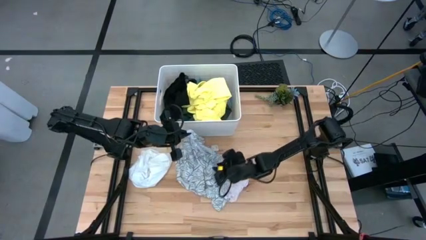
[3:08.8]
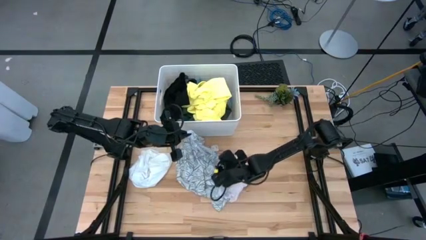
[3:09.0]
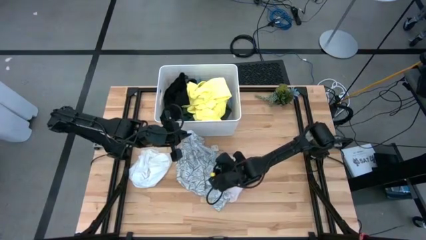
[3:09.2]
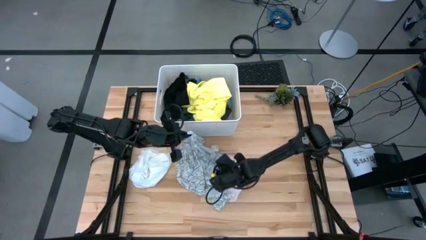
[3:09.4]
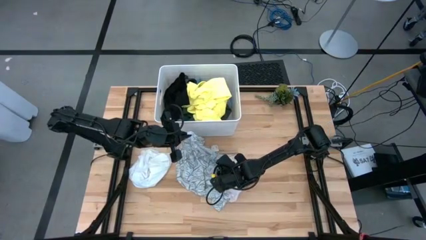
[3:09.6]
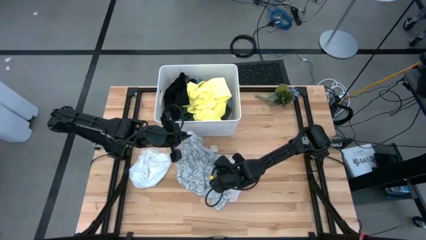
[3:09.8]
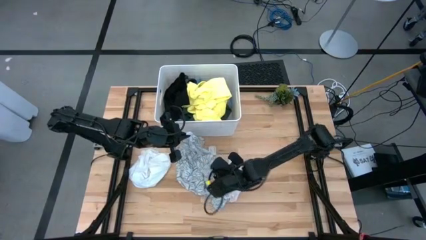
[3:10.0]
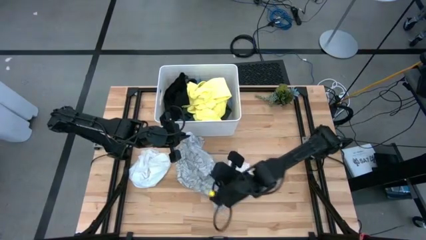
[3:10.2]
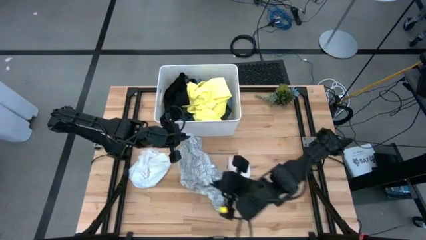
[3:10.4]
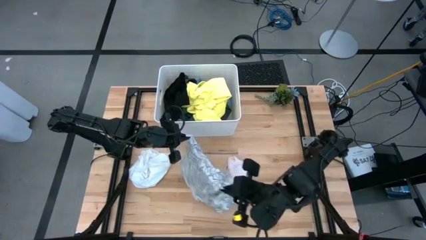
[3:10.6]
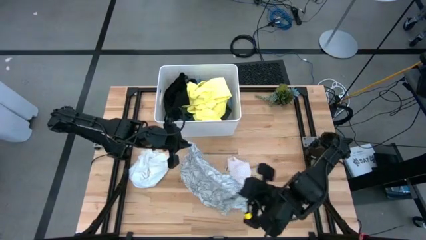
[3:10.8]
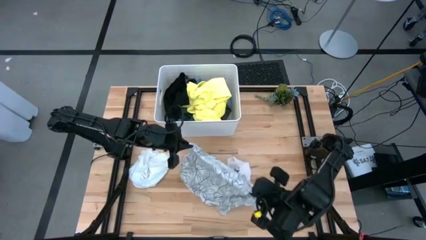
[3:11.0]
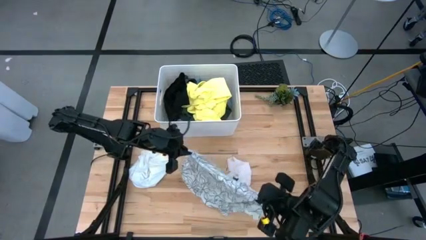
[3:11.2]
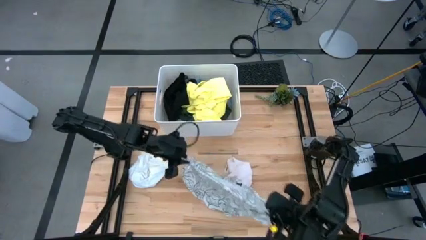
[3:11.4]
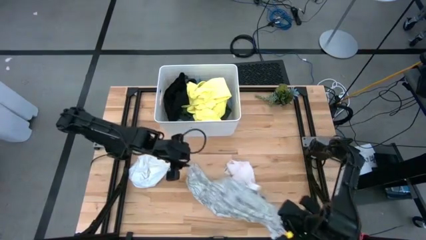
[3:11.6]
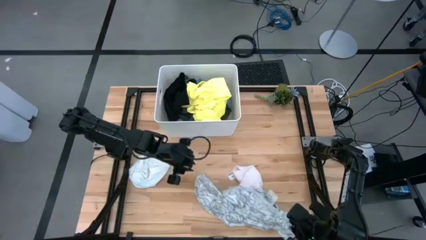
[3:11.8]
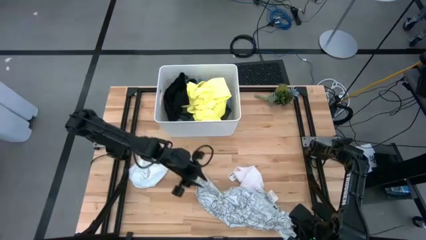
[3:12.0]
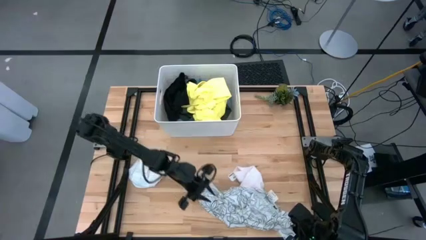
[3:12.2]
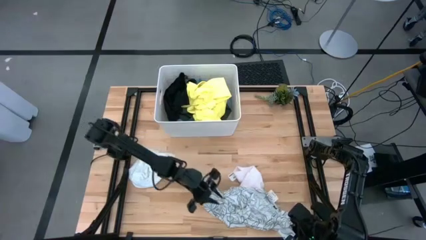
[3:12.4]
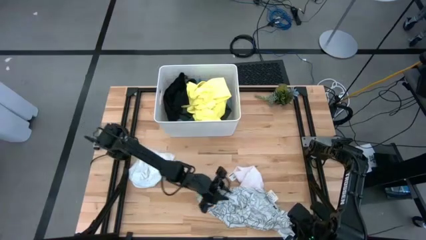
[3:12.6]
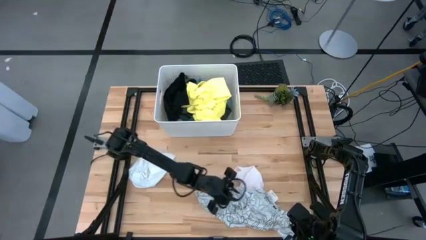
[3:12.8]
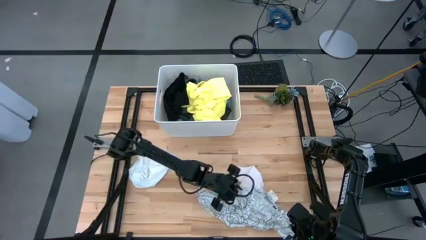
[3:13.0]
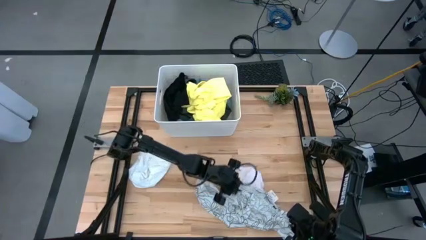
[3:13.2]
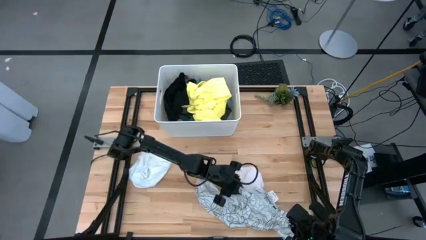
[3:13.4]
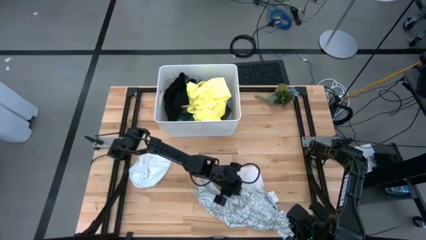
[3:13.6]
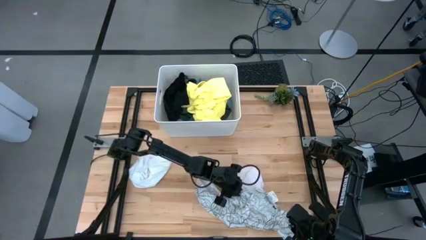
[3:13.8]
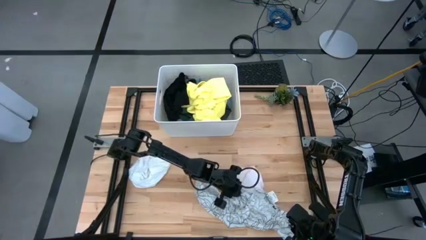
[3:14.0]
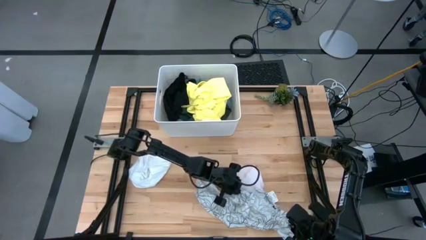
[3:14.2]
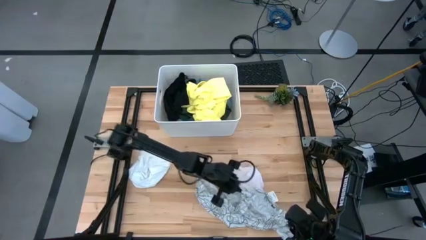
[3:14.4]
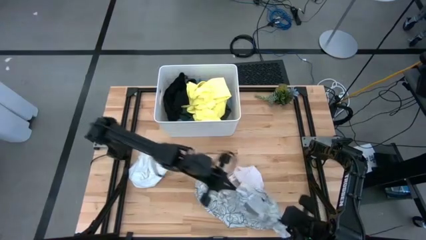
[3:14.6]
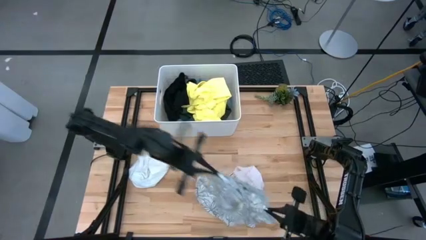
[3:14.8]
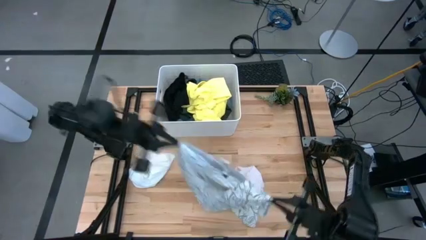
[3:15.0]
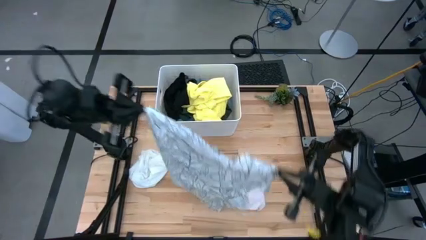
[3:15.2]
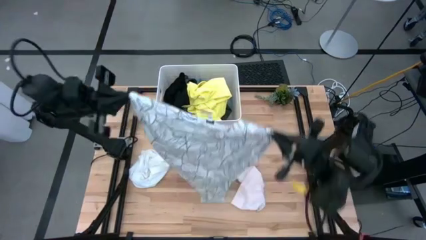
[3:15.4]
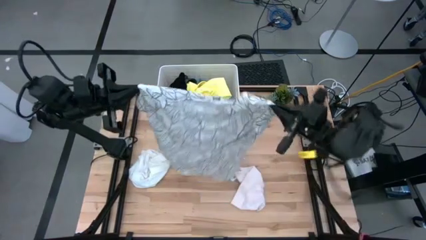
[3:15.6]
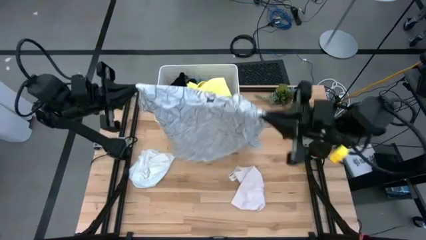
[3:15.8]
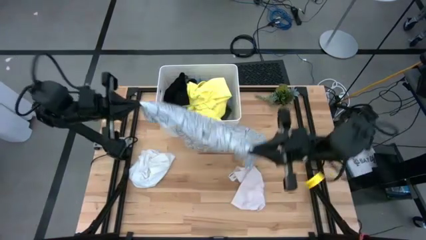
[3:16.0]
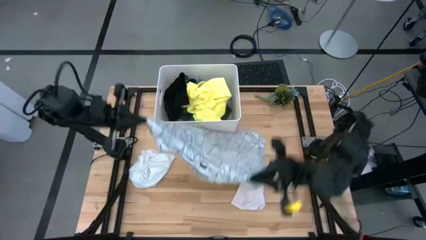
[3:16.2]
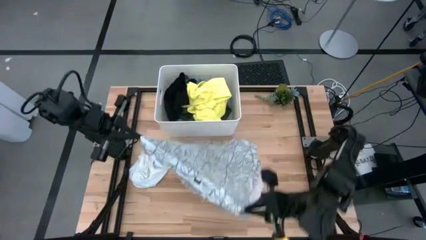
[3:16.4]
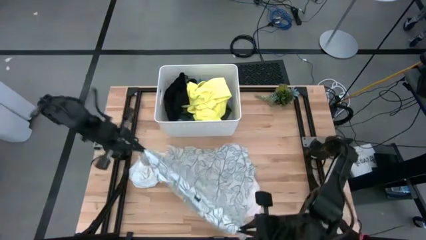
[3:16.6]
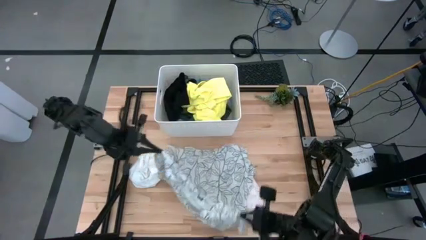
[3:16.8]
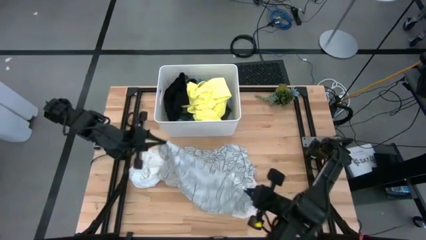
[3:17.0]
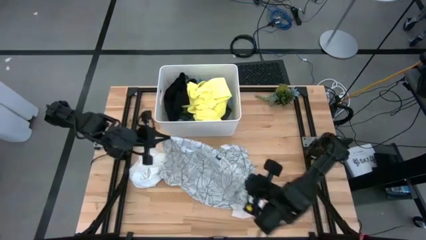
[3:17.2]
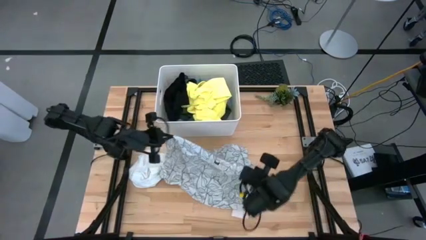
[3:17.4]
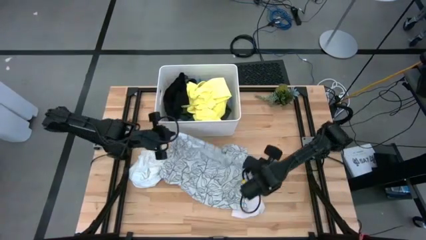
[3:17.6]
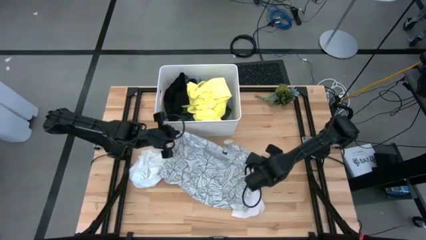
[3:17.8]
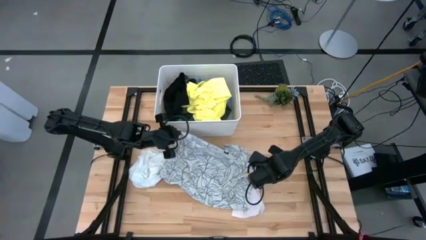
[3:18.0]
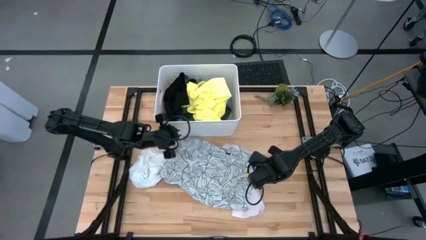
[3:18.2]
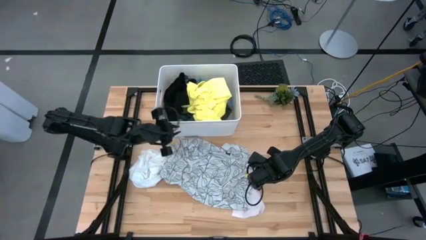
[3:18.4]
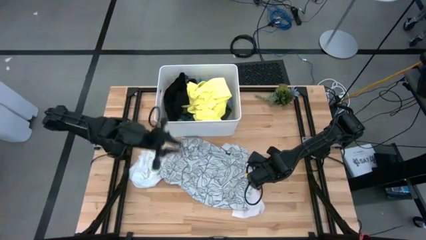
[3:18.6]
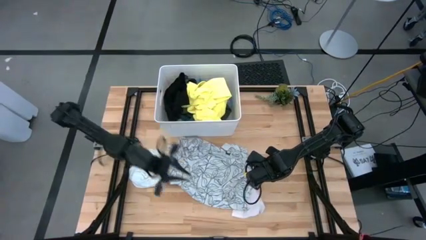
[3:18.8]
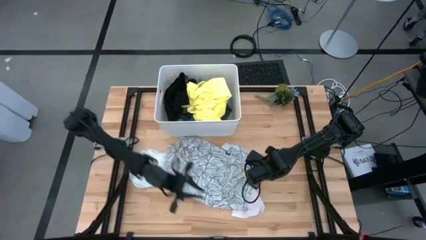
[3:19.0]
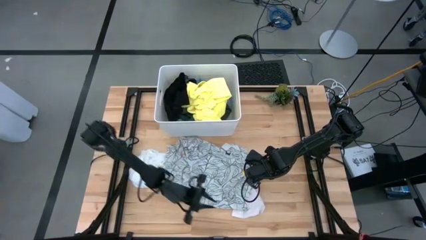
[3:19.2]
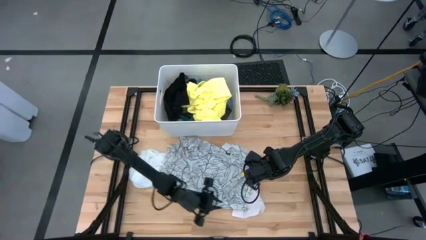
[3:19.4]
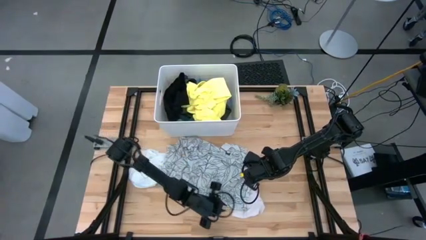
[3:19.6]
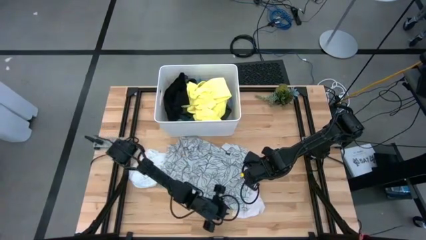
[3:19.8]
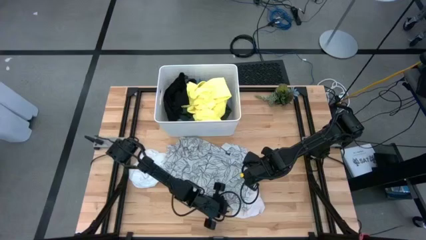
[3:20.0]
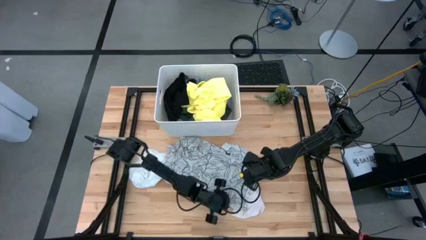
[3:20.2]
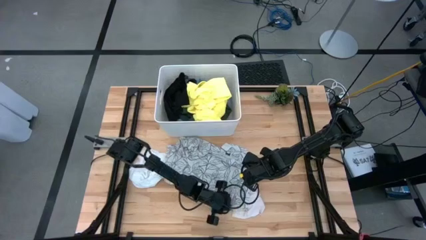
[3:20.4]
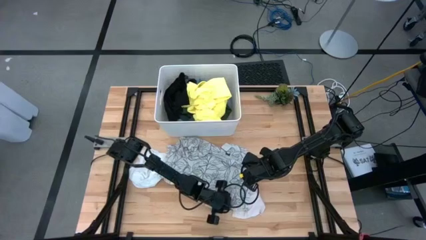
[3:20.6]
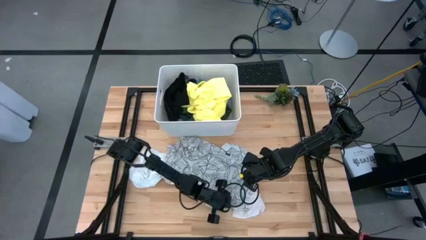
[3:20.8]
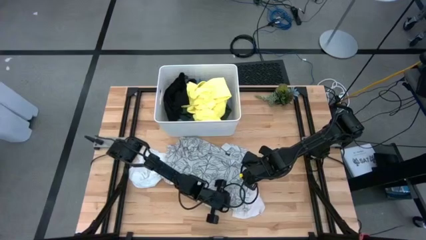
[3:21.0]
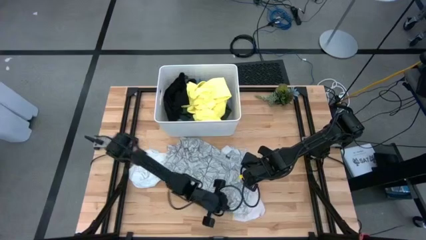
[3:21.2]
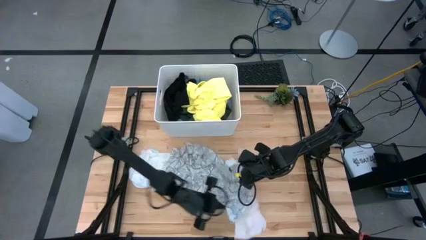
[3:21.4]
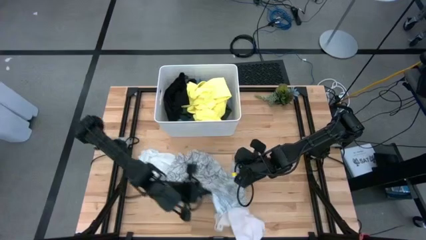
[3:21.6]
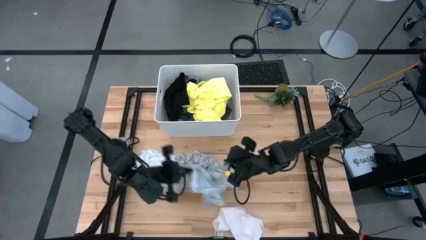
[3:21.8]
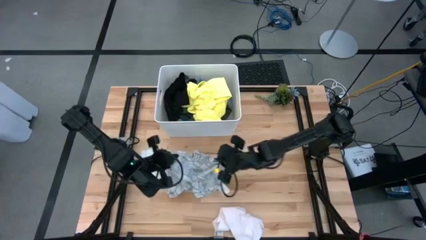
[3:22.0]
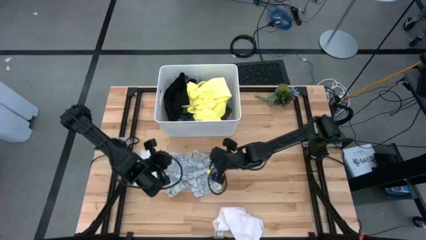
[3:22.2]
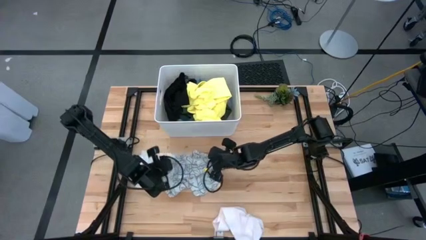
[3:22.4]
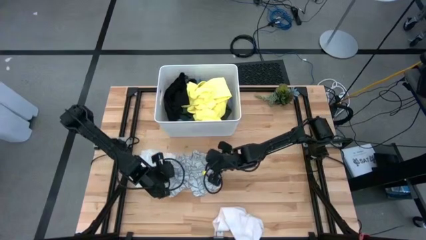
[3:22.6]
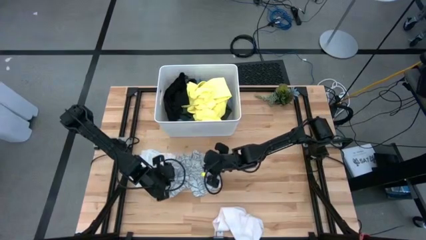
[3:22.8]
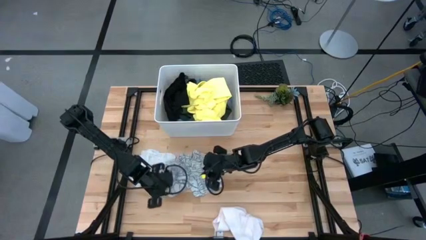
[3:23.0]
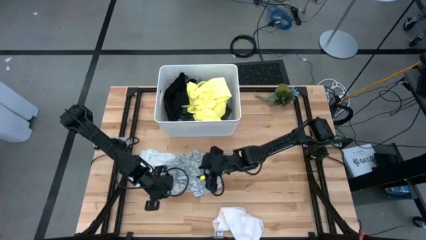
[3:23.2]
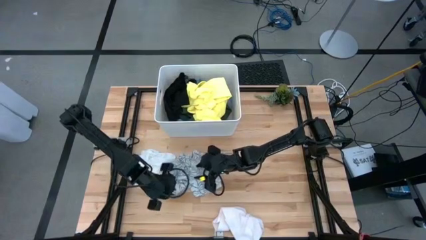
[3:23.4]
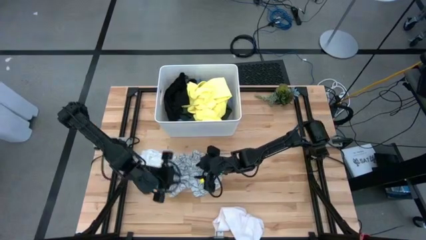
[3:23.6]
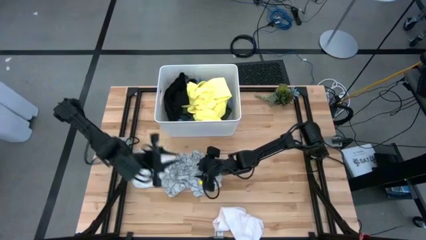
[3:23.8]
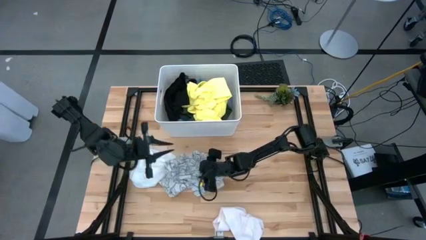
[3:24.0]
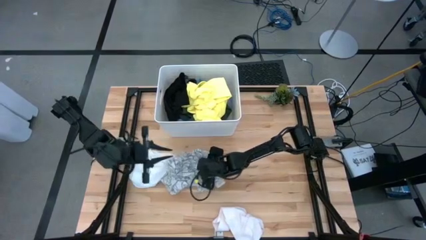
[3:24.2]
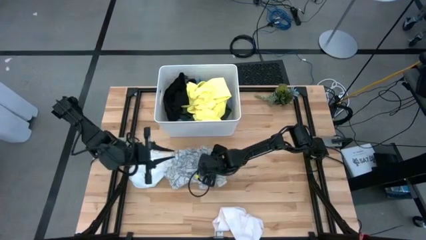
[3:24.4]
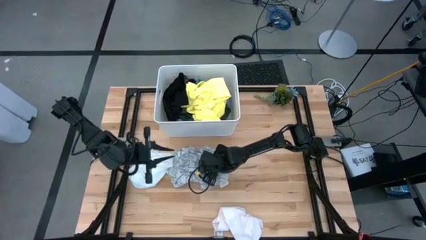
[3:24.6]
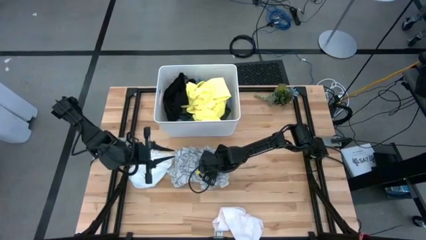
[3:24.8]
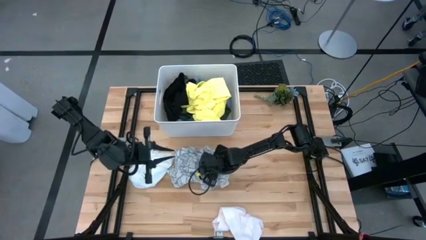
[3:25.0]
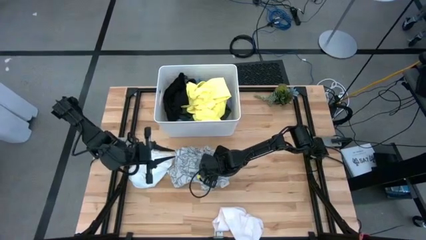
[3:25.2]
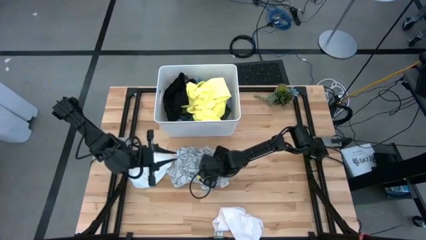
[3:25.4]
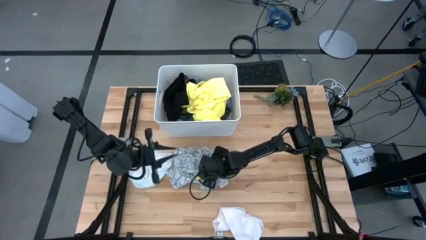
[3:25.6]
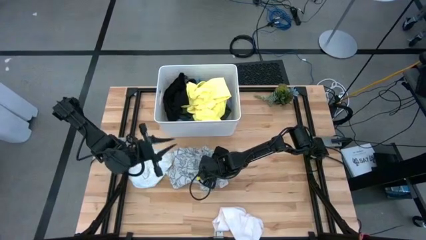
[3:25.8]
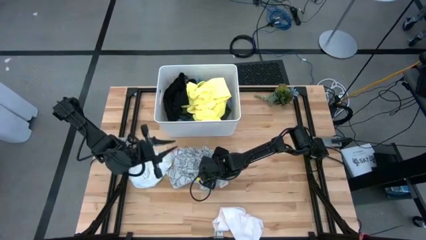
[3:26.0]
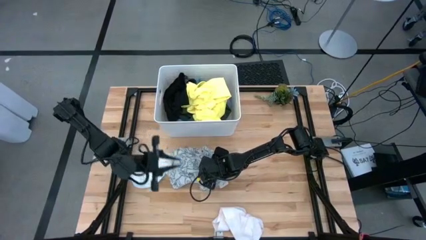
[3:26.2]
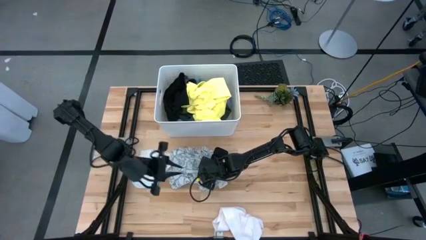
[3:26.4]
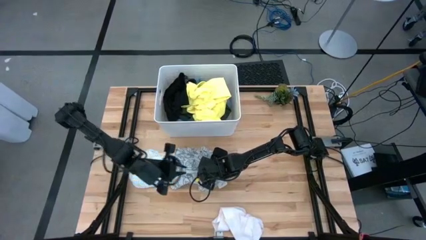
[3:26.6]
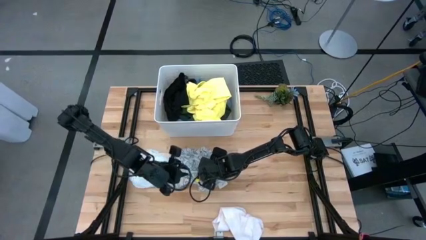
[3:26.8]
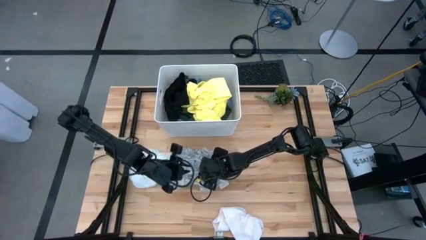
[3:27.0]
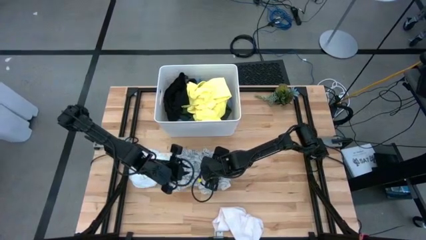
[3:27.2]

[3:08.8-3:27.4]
Task: Fold laundry
Fold the white patterned blouse
